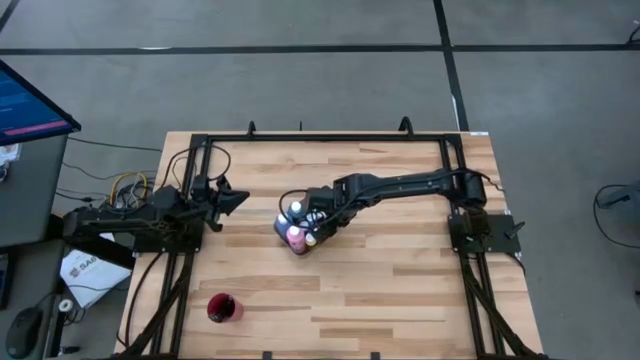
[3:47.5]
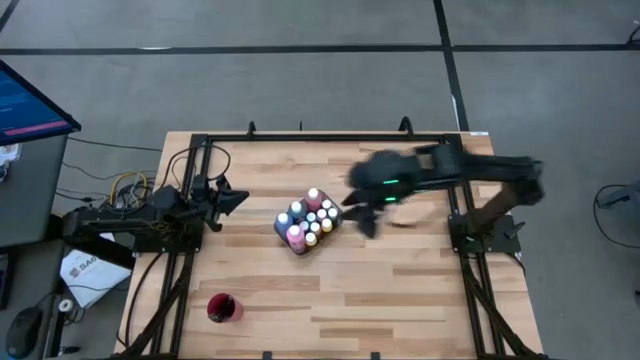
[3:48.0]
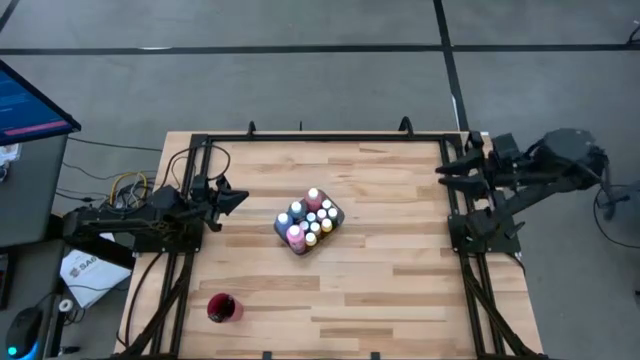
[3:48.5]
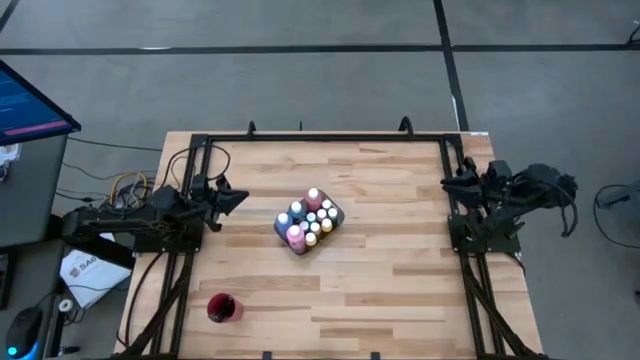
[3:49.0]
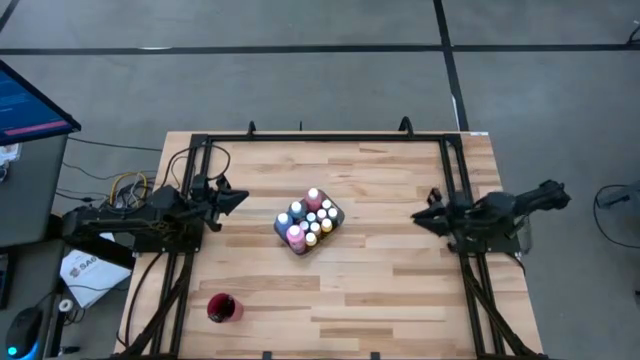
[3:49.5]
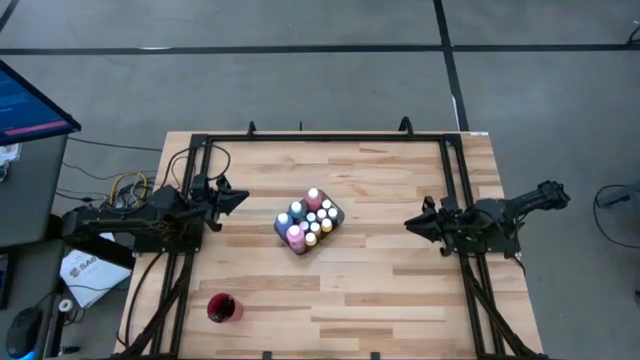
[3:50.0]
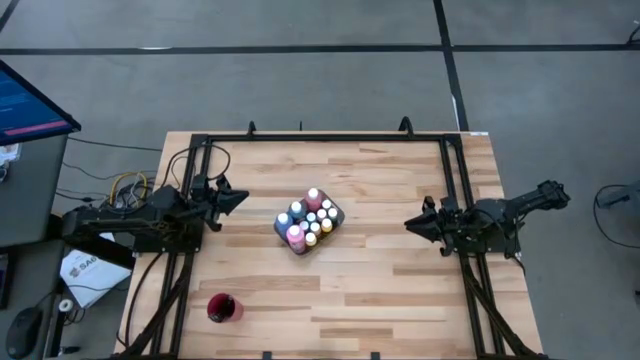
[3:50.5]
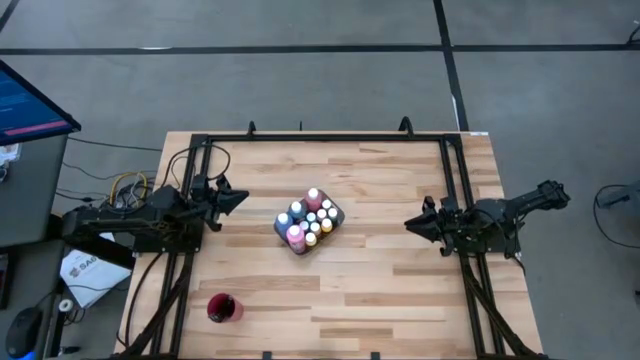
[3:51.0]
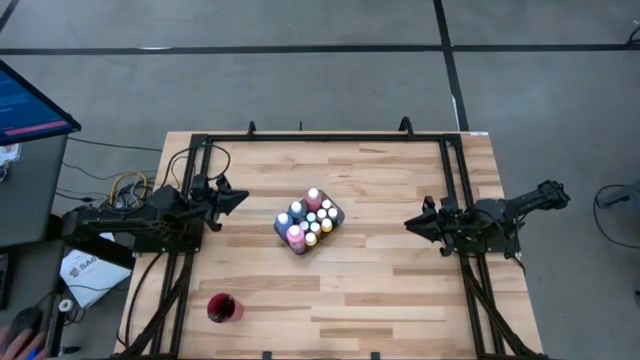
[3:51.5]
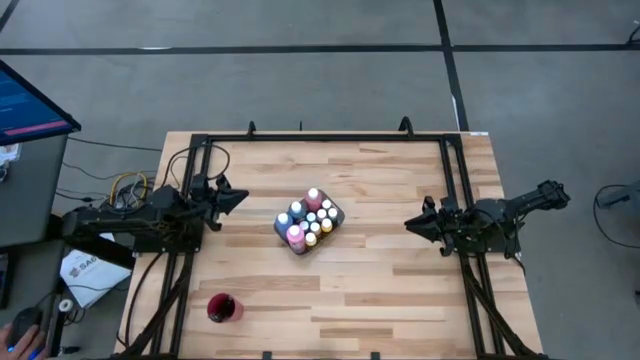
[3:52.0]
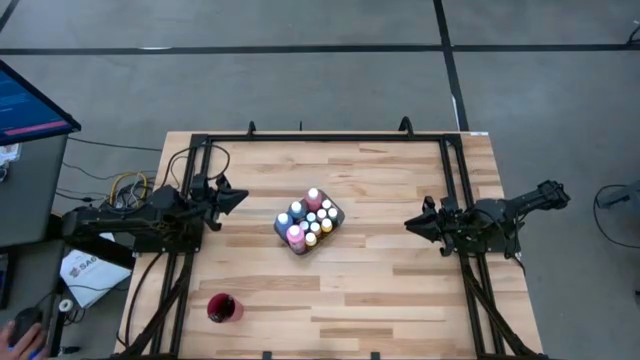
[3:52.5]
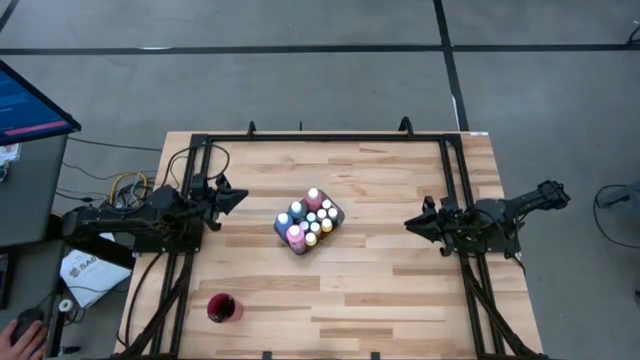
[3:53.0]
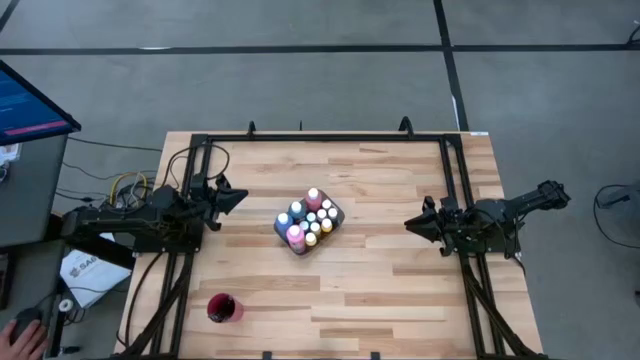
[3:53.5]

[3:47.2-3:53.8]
Task: Pick & Place Paint Supplies
Return to Home Position
